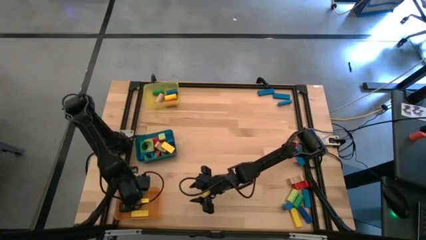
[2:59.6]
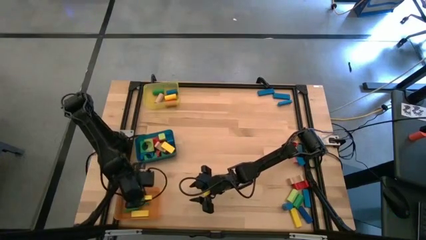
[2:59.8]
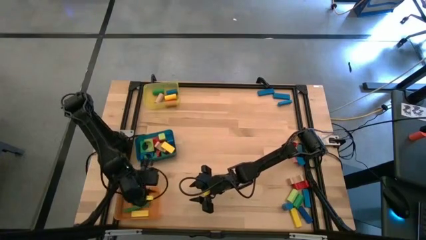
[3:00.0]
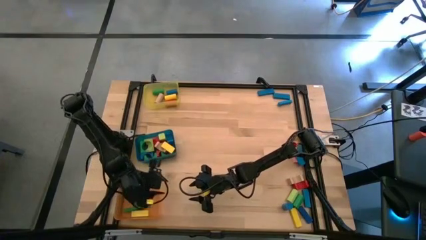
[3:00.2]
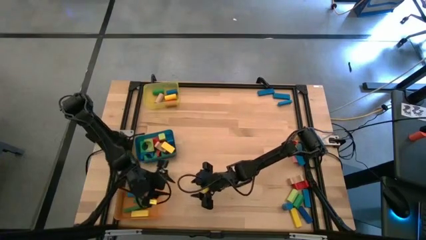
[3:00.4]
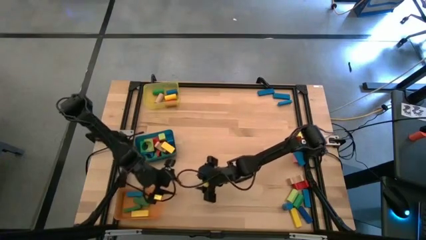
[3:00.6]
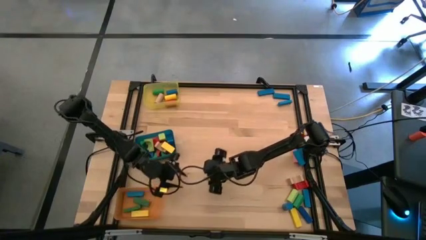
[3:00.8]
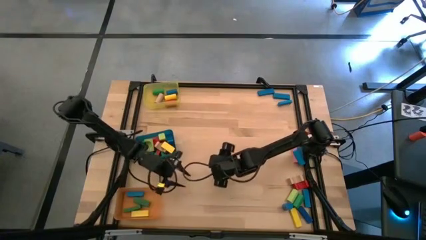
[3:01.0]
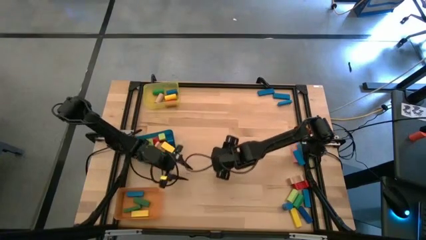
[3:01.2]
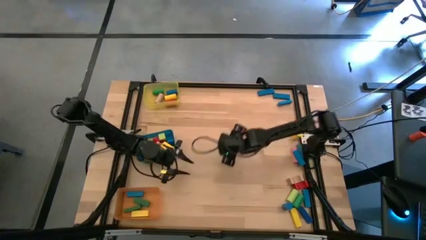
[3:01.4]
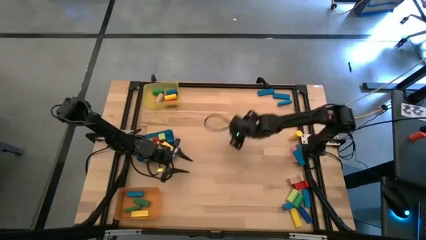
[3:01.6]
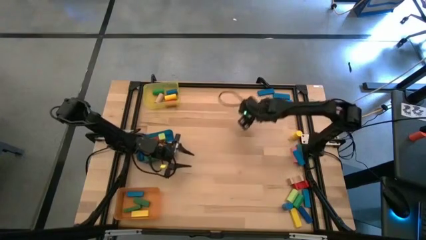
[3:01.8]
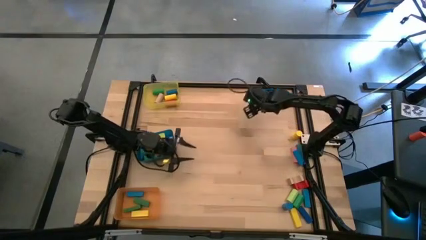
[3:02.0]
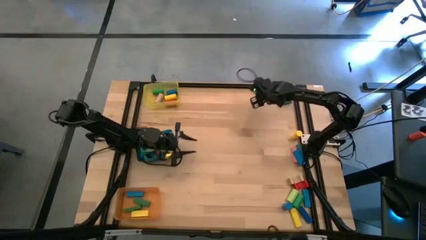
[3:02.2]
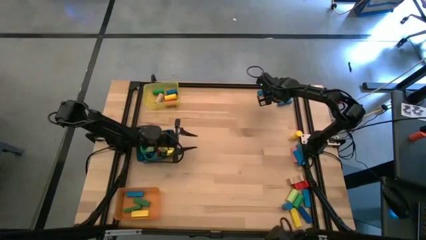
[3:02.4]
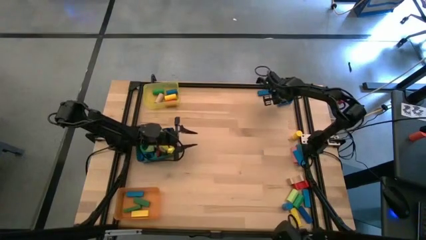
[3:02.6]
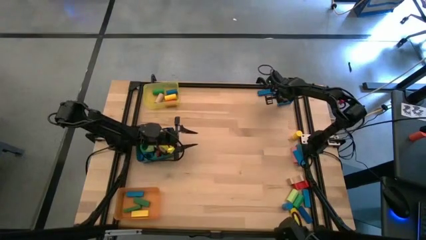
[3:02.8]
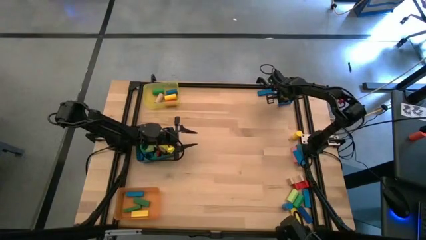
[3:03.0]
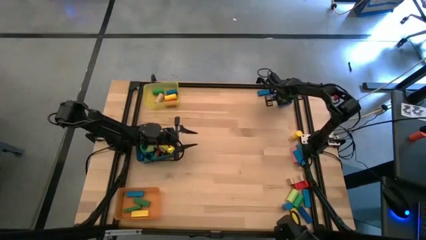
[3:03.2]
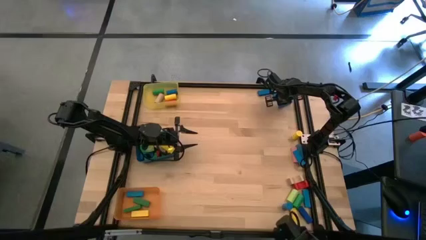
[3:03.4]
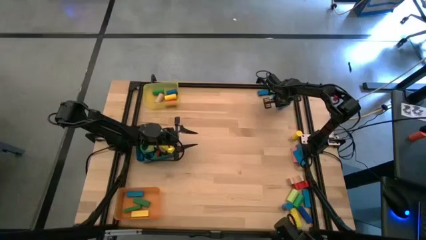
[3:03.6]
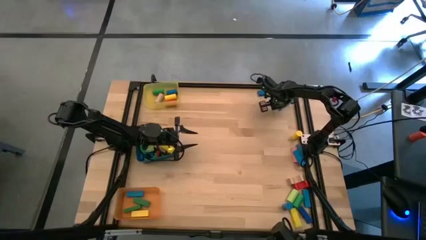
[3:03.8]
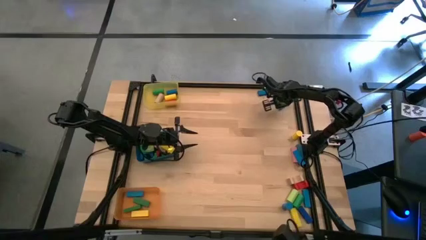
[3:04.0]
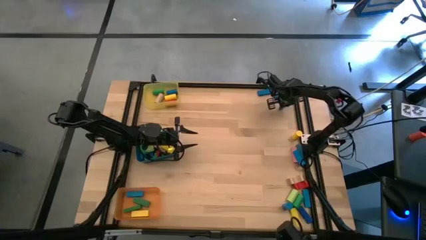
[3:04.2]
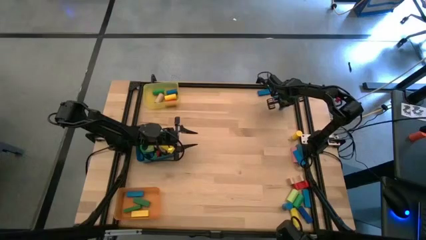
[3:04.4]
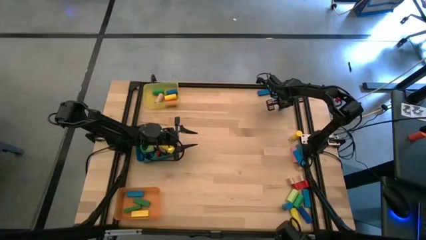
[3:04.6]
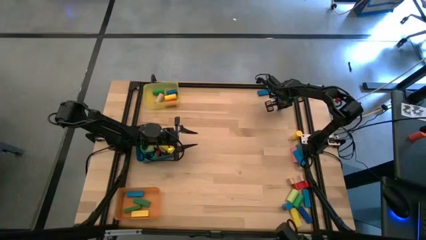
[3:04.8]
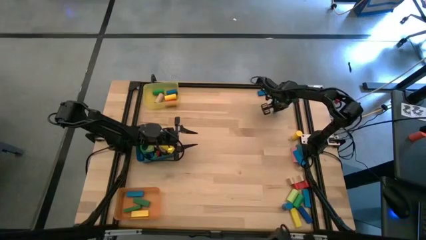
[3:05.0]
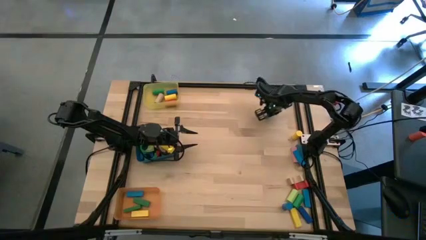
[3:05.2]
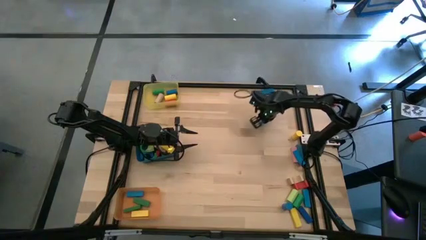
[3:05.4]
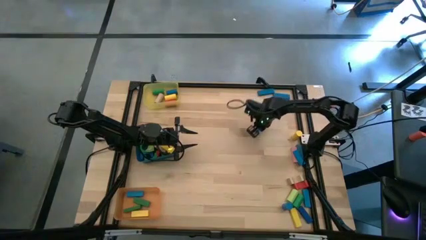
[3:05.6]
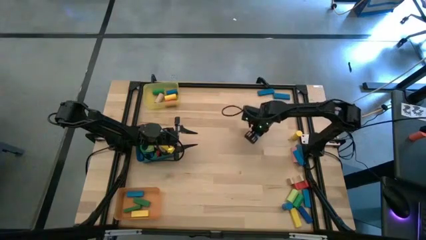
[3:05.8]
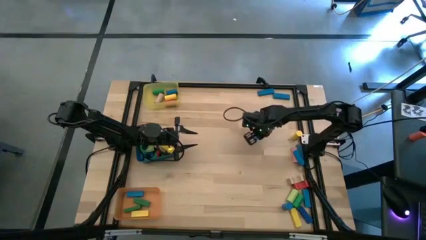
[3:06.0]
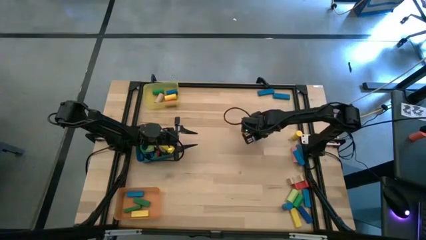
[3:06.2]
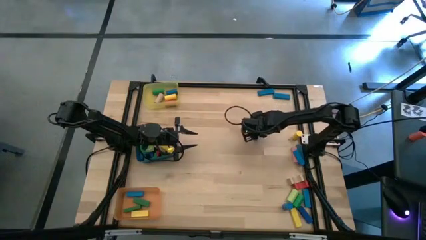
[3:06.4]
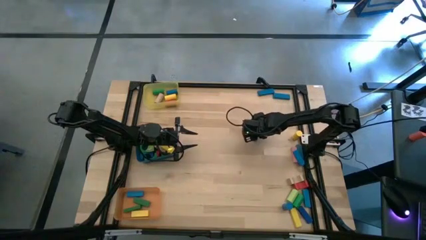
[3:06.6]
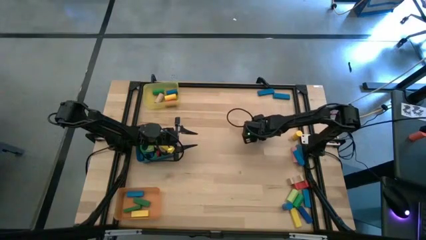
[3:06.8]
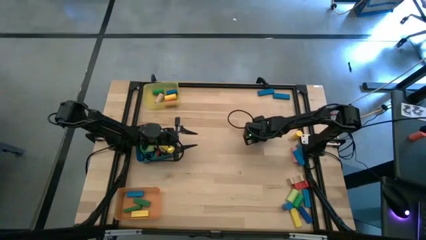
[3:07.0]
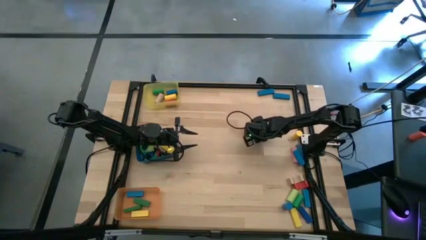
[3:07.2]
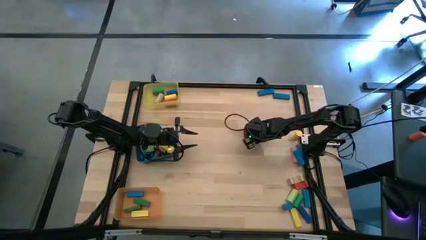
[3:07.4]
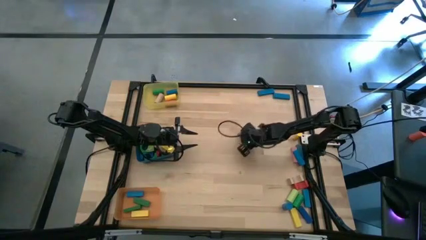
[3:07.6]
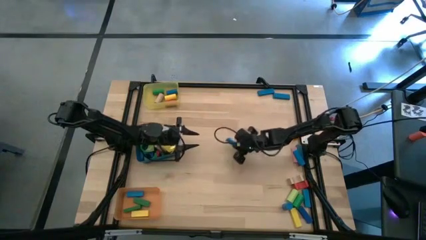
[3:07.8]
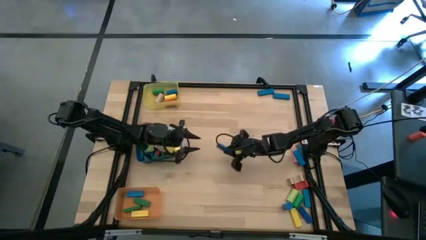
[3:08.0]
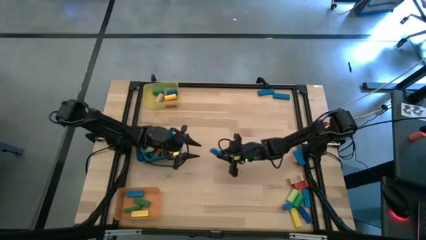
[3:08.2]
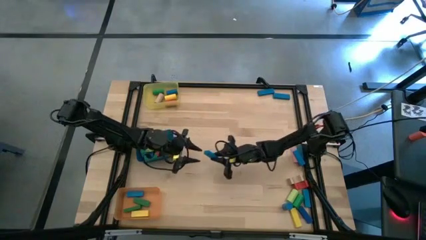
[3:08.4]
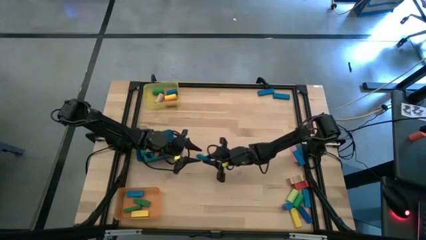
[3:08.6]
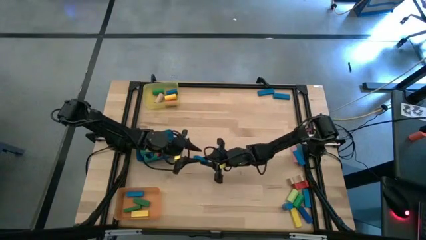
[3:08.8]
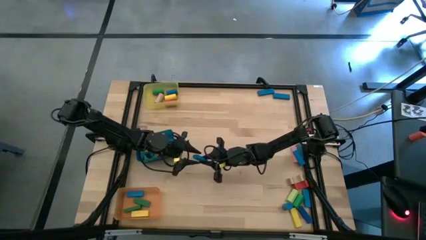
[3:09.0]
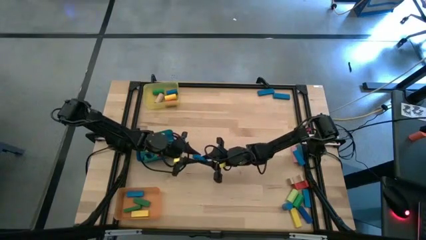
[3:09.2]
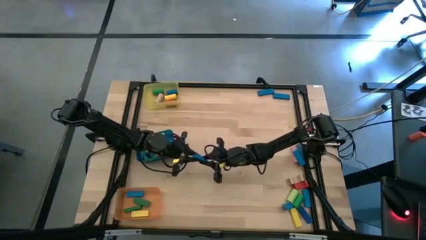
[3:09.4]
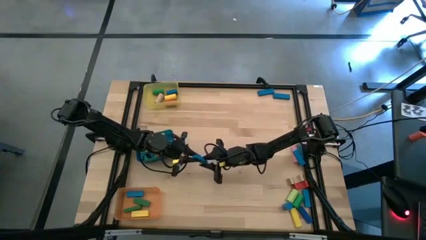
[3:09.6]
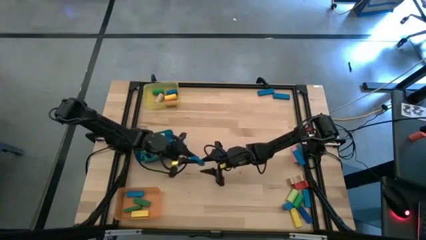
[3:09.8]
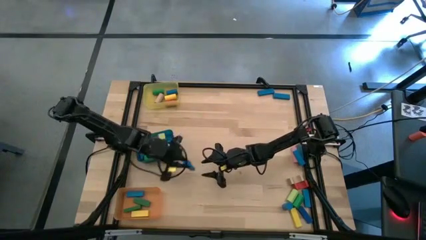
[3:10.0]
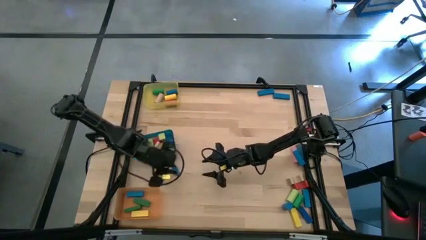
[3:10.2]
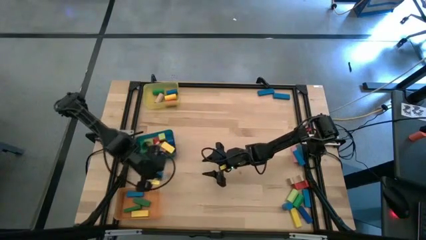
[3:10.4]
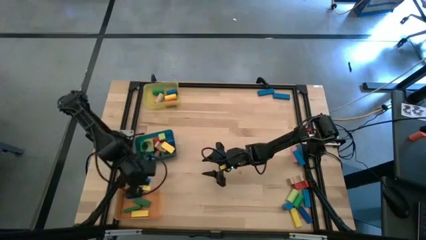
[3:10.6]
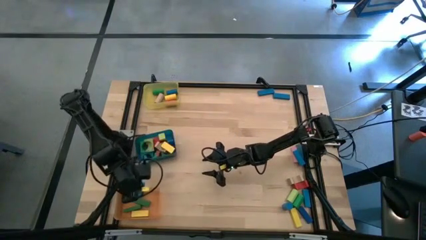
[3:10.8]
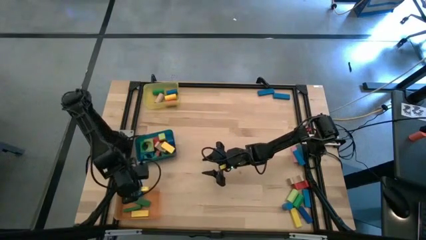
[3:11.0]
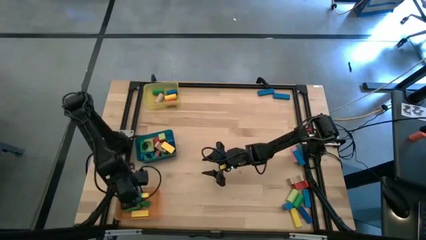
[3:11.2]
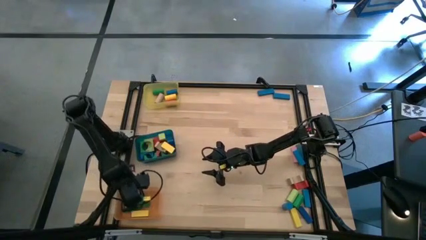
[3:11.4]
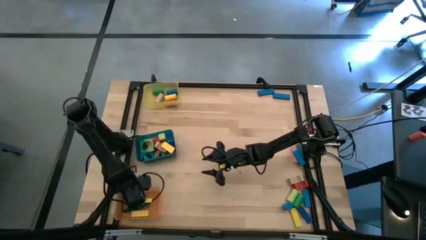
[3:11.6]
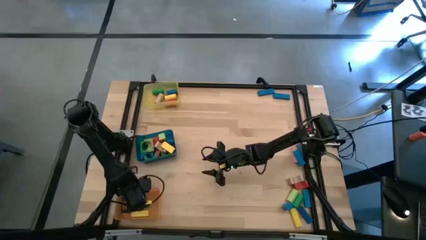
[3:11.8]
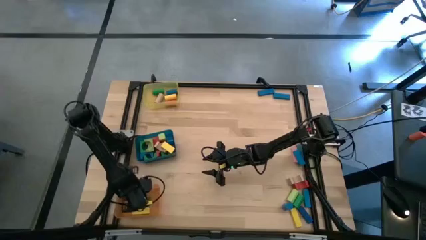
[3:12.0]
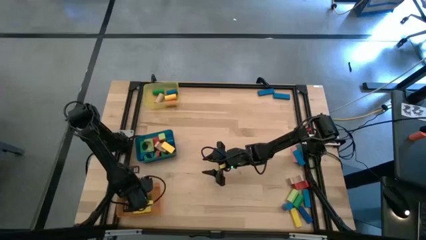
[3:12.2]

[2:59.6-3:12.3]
Task: Sort blocks by size
Put the blue block into the orange bin

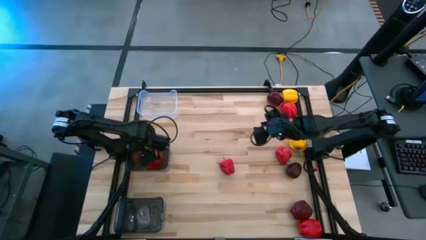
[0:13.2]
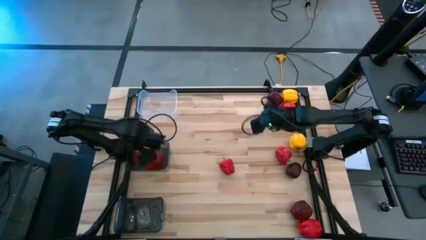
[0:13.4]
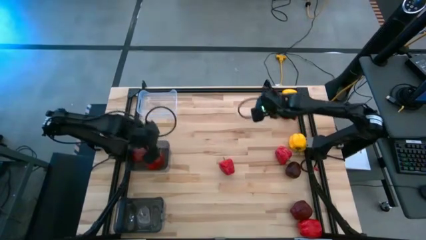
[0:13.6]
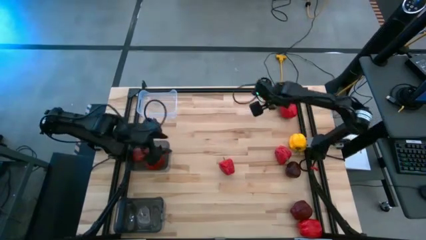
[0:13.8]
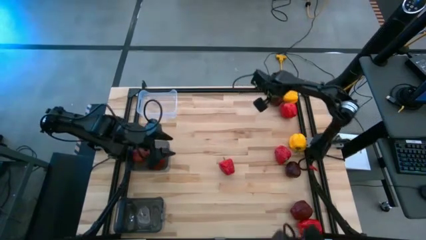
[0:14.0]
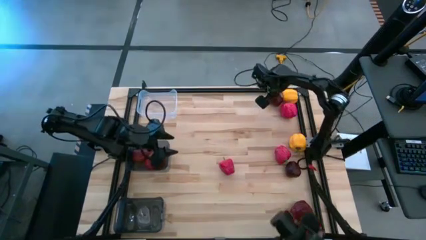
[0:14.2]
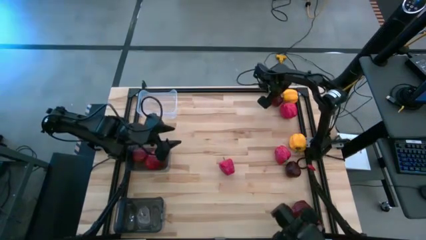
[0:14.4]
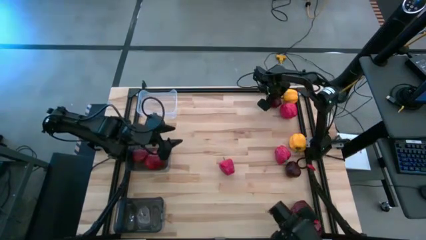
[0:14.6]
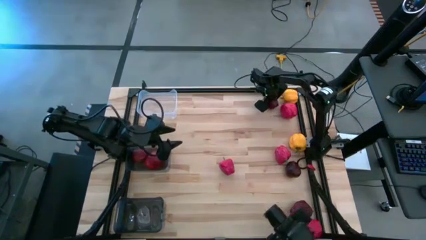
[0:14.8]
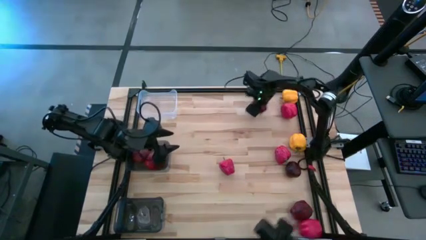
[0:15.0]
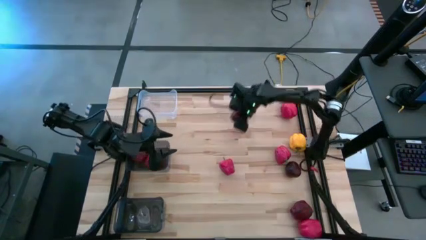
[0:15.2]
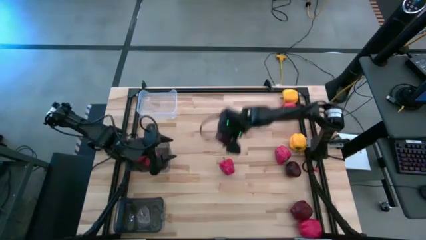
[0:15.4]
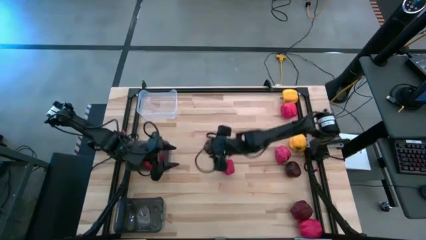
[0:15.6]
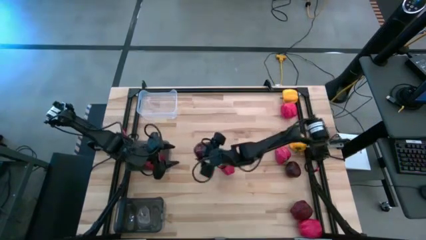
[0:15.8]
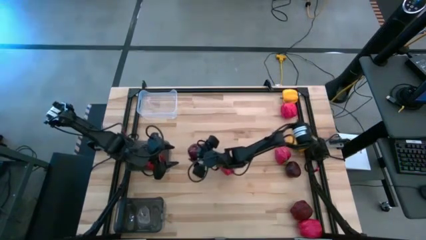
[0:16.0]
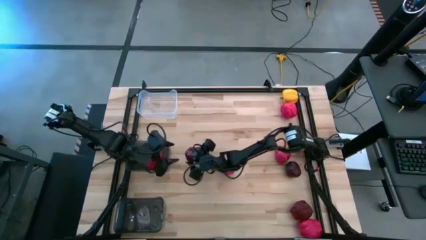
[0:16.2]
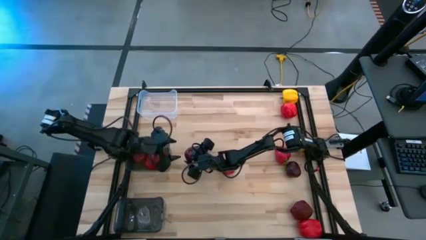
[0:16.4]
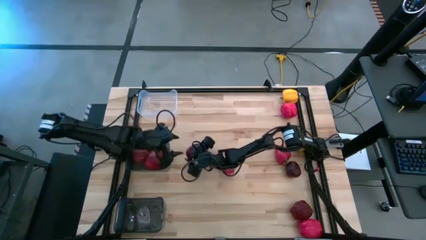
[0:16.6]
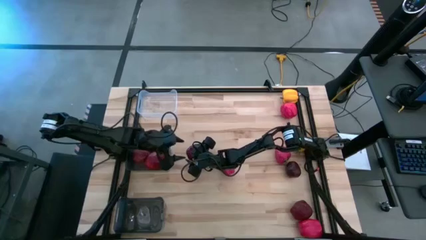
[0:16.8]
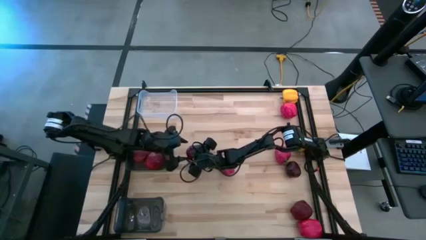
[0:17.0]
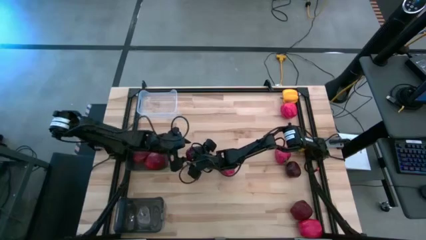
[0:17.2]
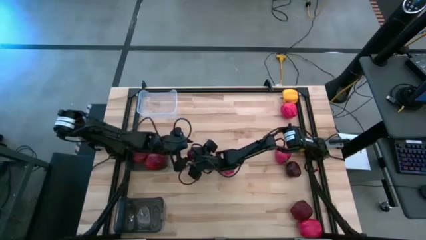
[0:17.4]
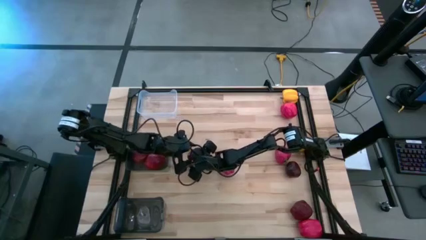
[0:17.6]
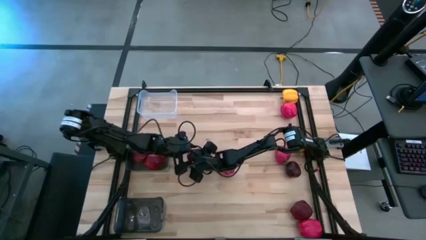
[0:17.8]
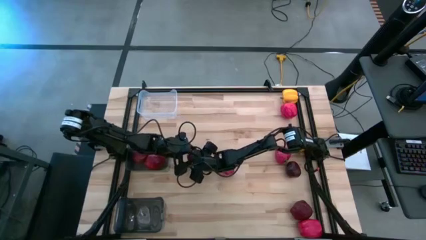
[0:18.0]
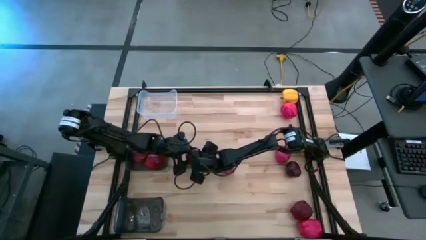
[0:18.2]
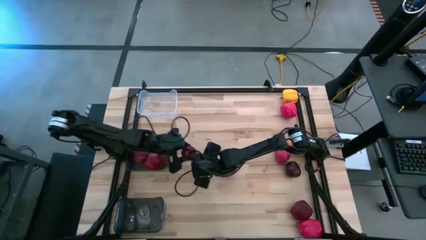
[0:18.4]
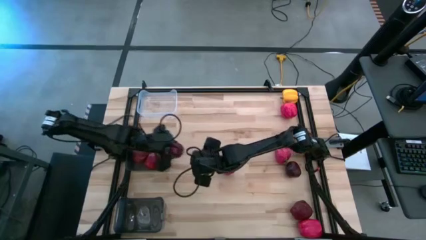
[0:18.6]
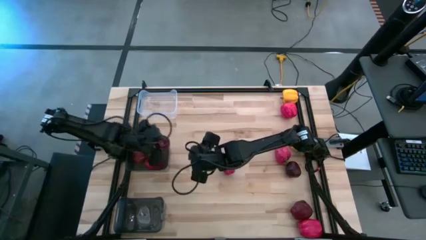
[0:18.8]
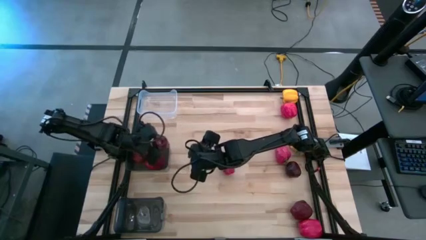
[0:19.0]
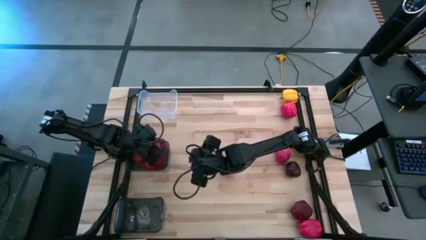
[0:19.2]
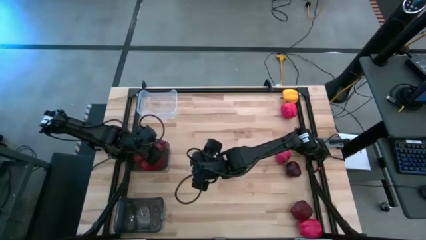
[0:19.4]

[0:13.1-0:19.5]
Task: Sort produce into baskets
Put the red apple into the top black bin
